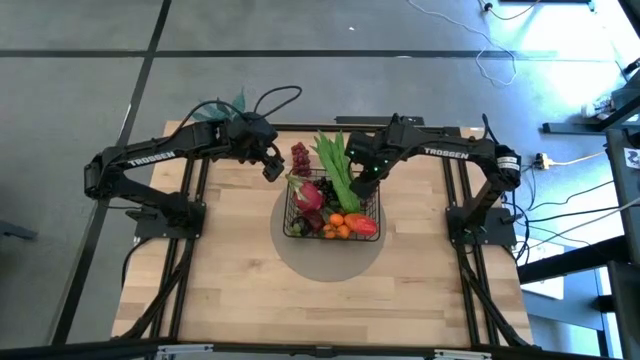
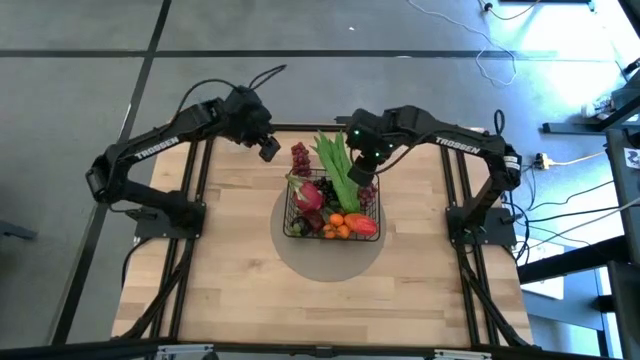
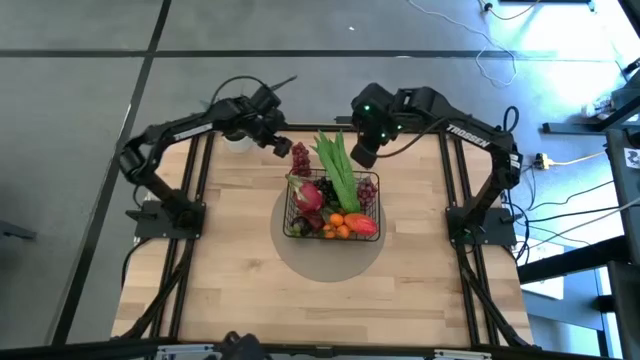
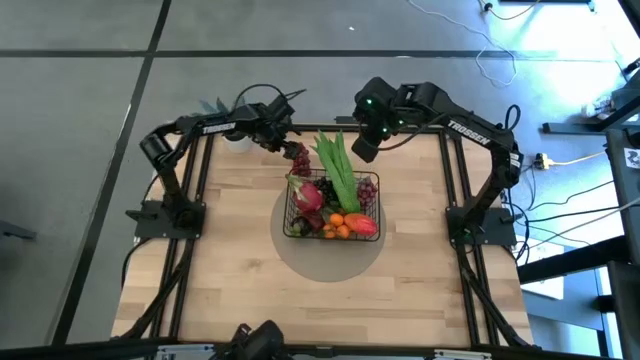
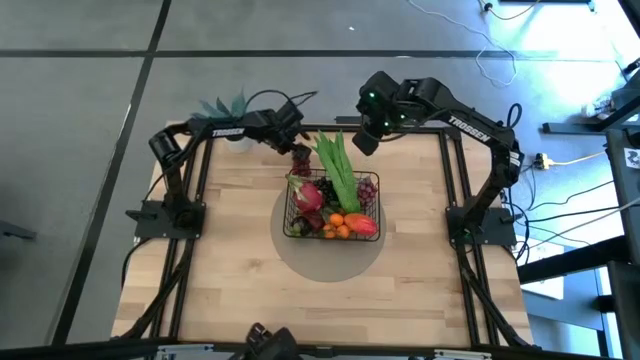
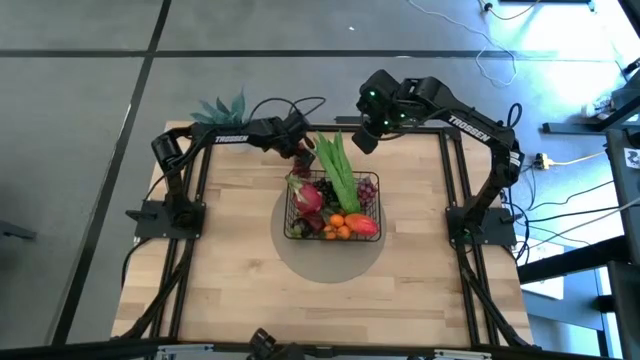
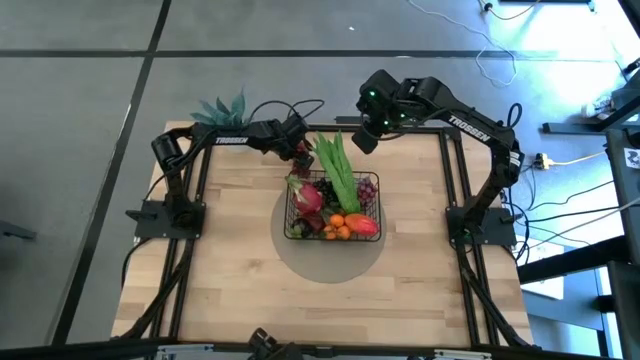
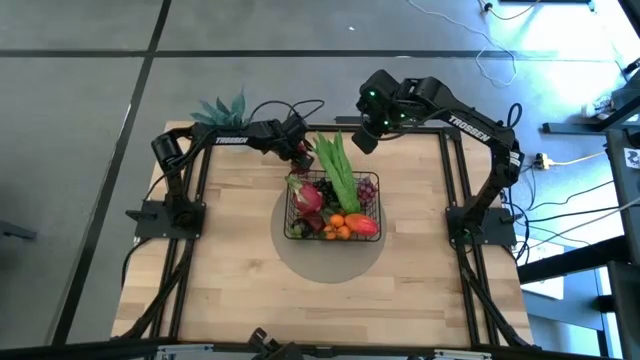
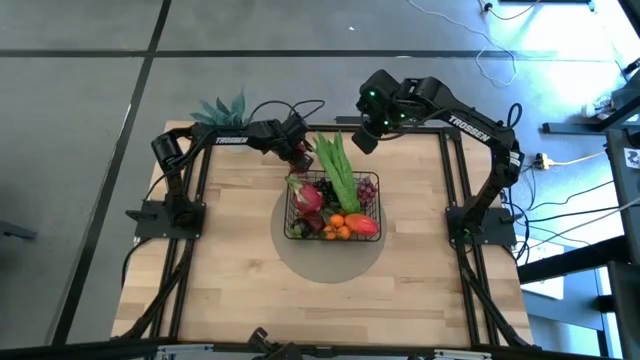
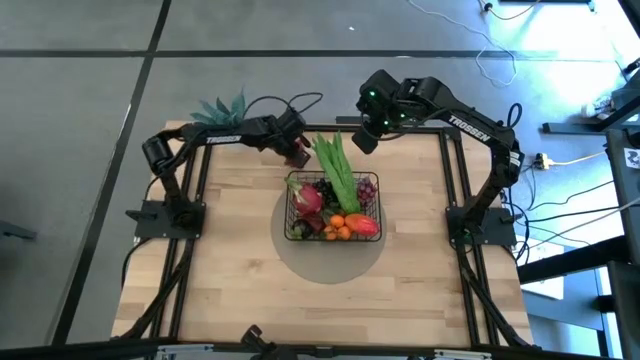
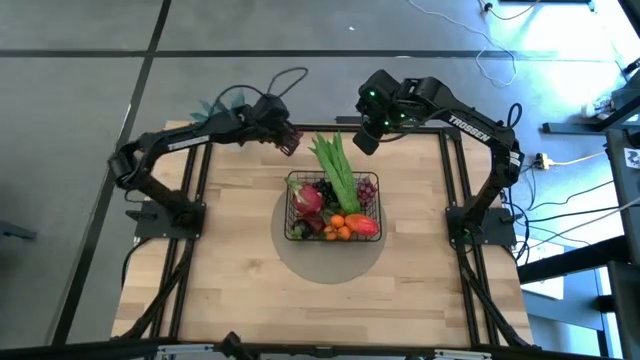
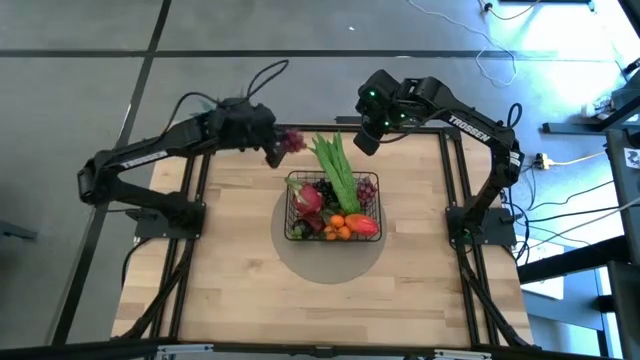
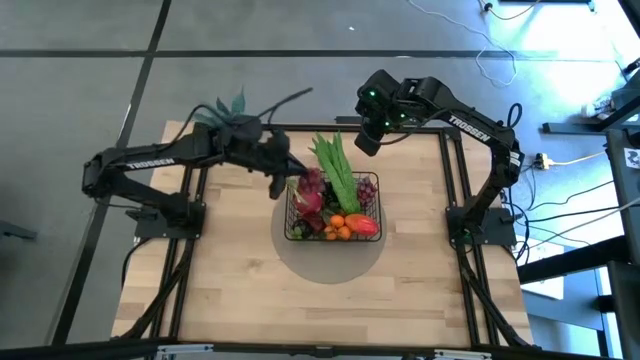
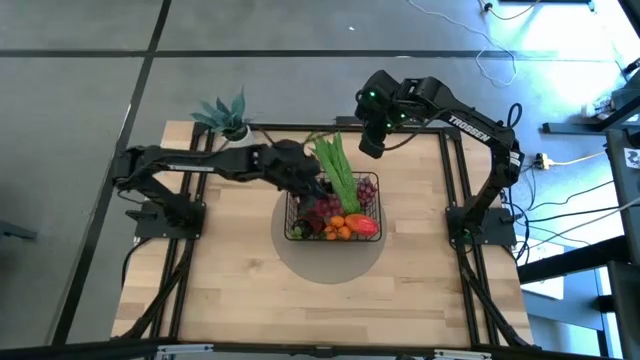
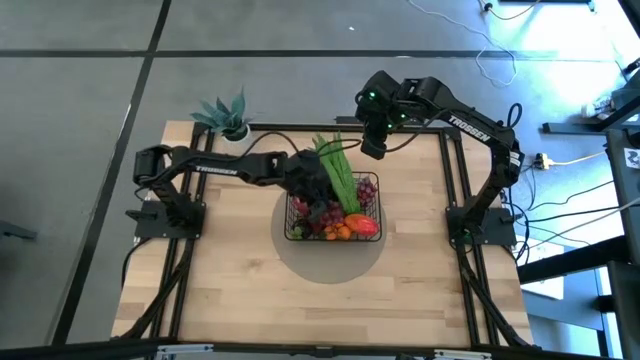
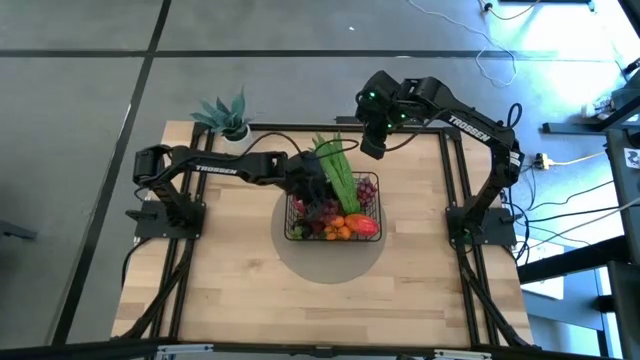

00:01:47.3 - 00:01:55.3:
Task: Build produce basket
Put the red grapes into the black wire basket

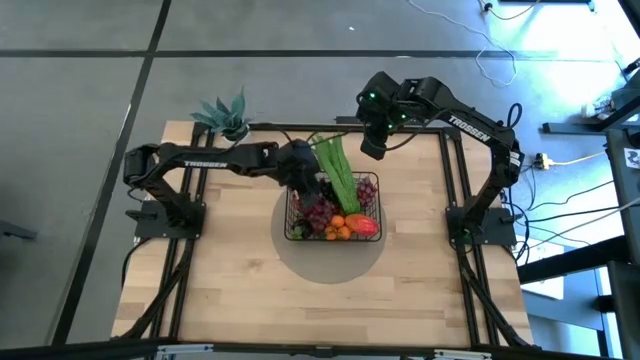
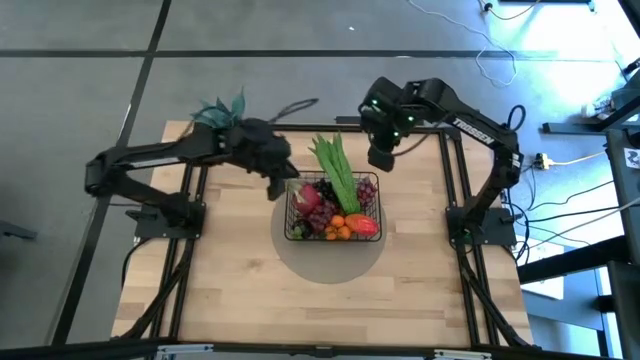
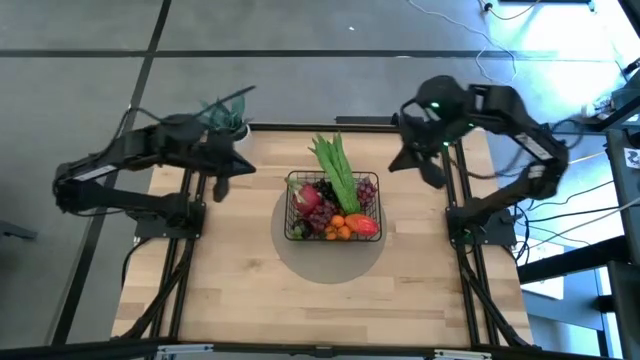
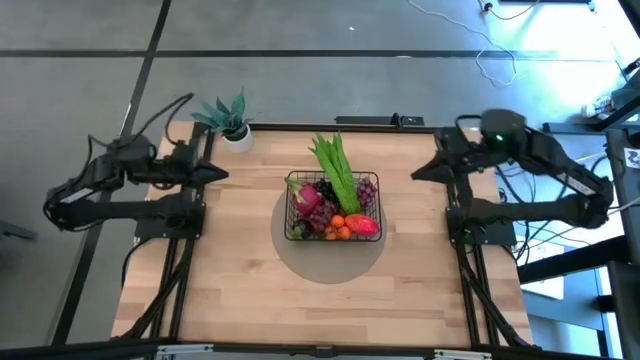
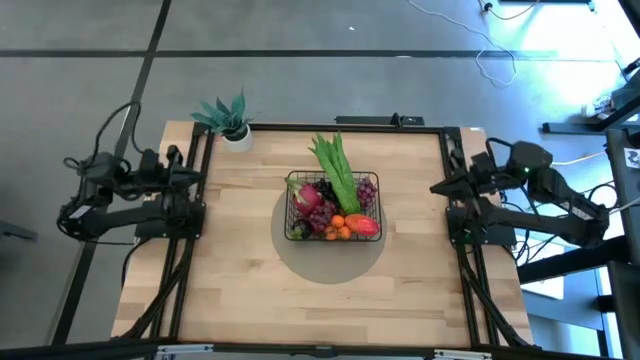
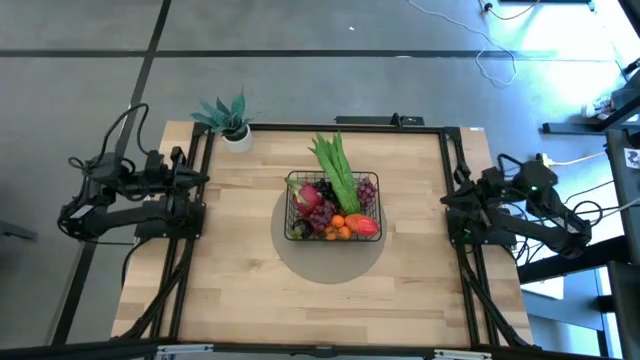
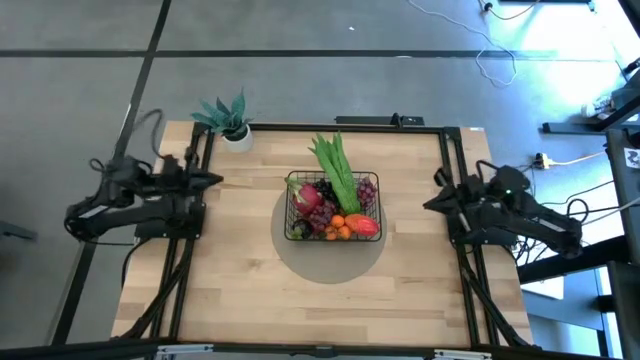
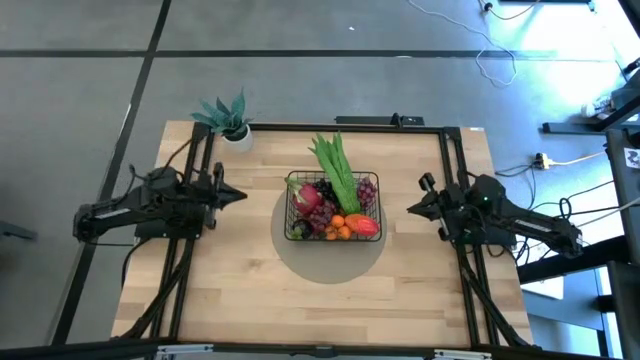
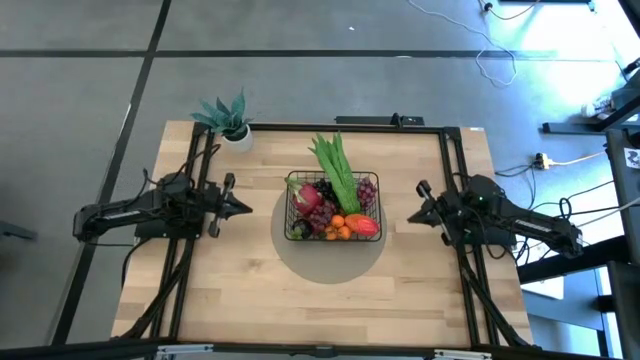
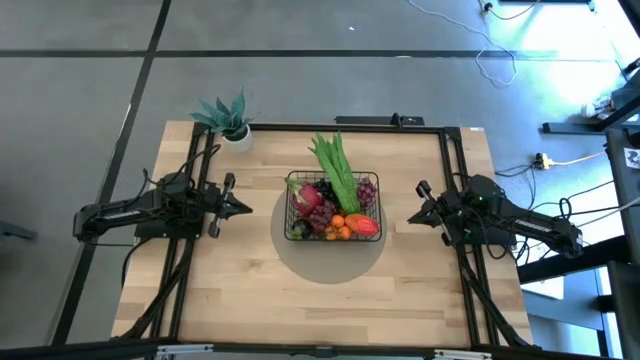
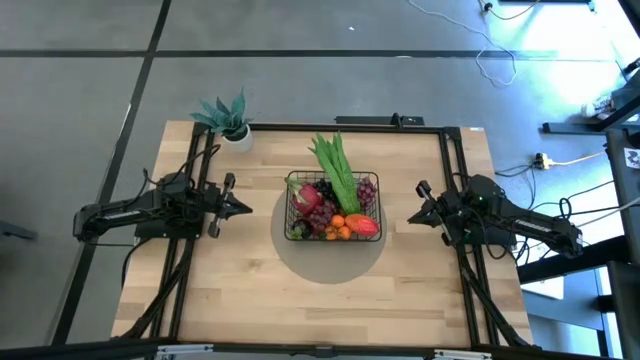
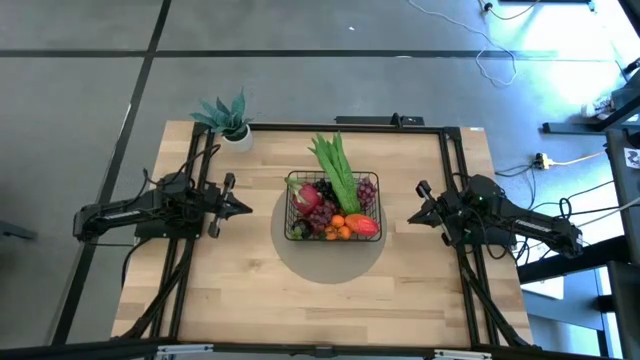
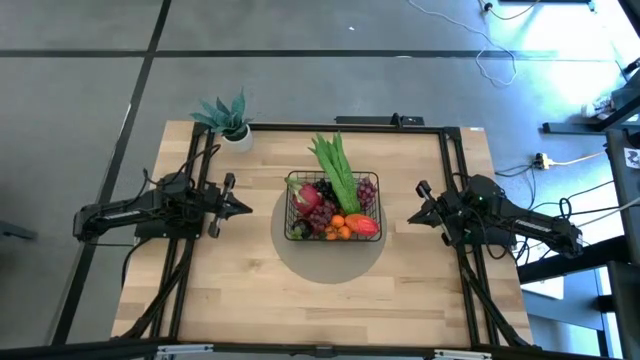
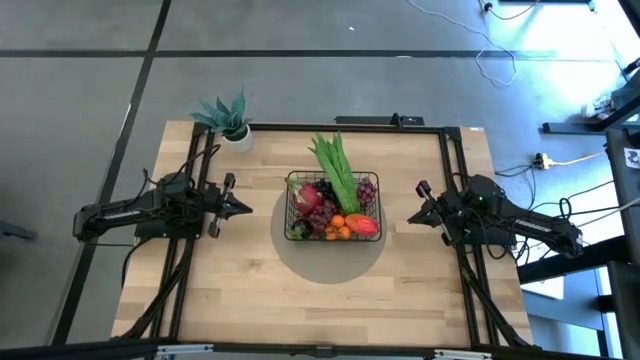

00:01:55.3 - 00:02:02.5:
Return to Home Position

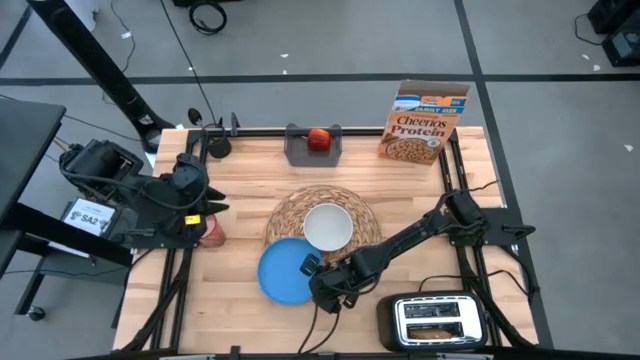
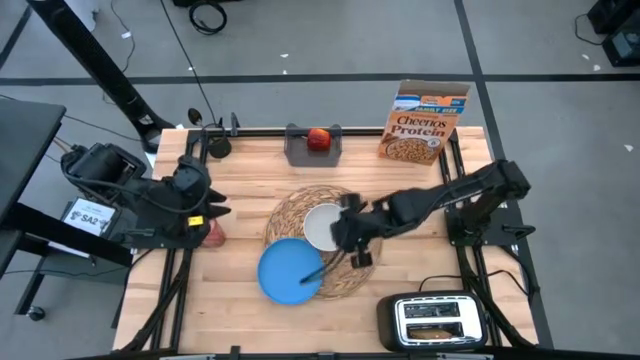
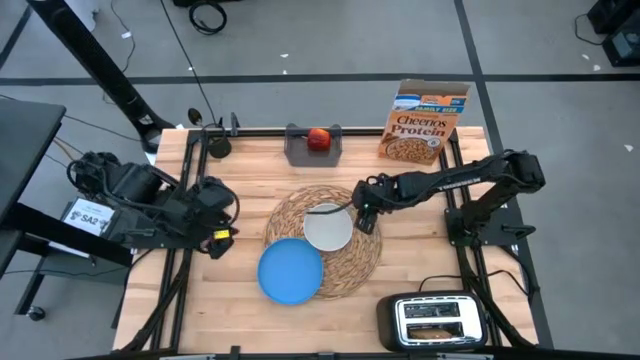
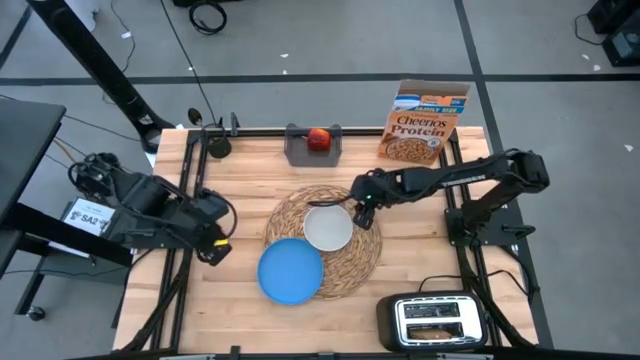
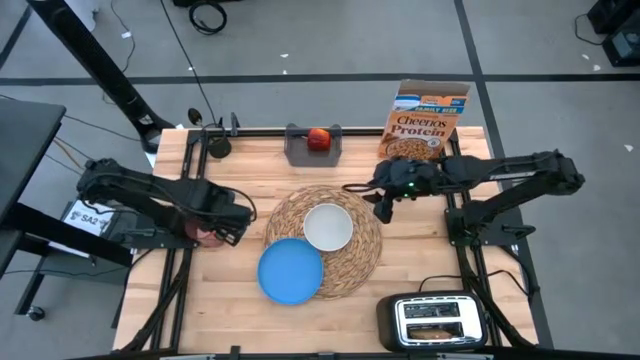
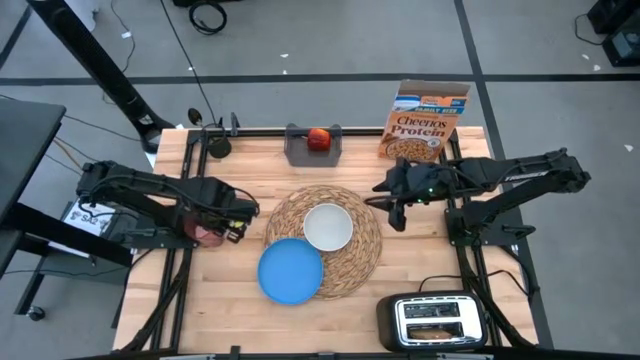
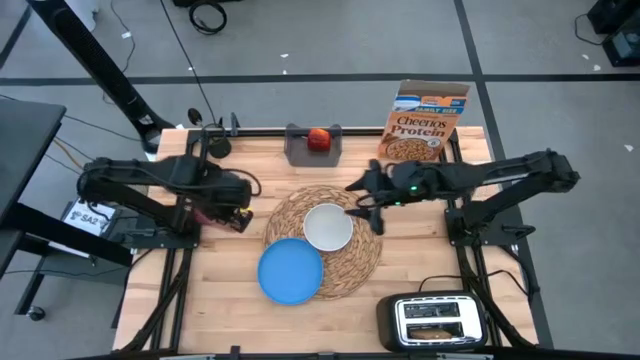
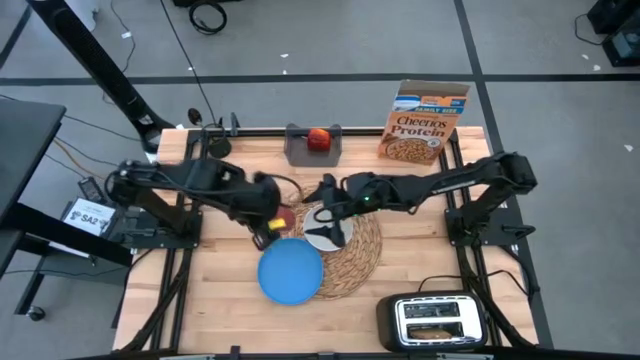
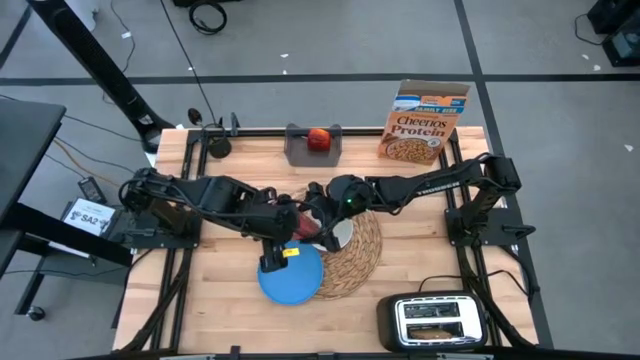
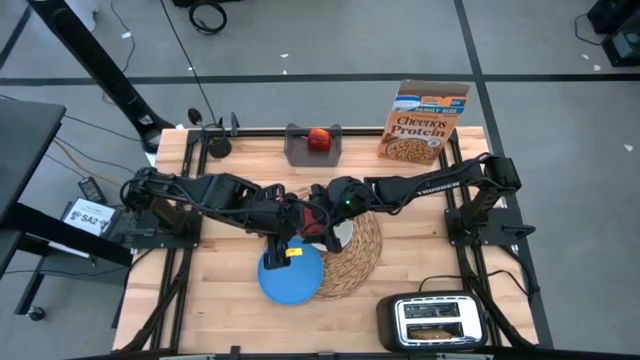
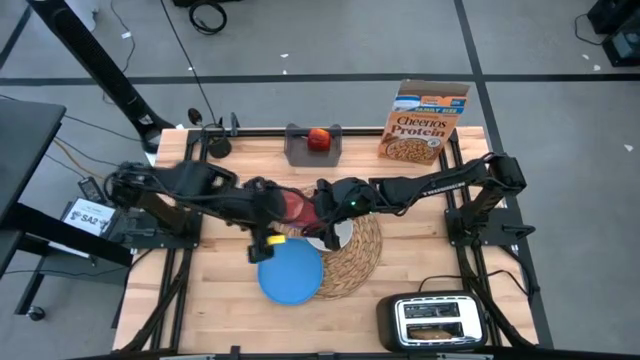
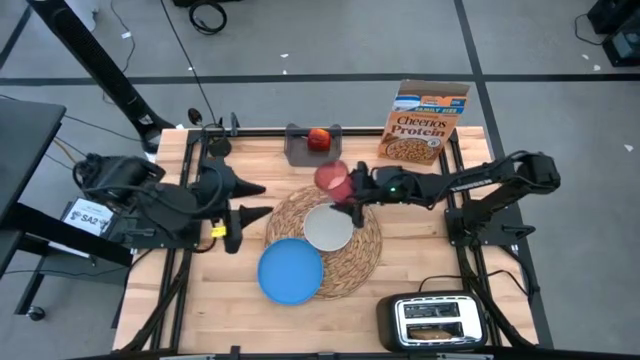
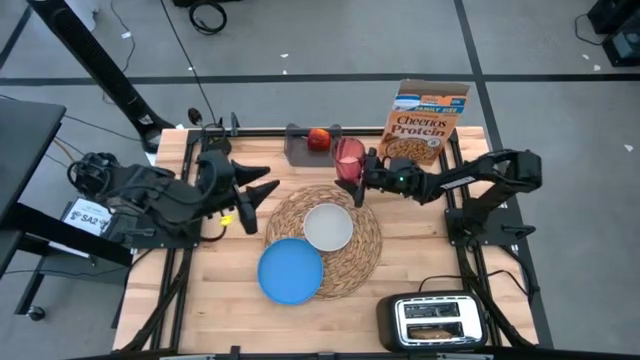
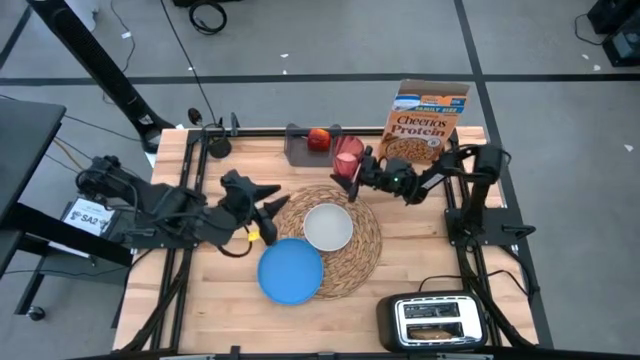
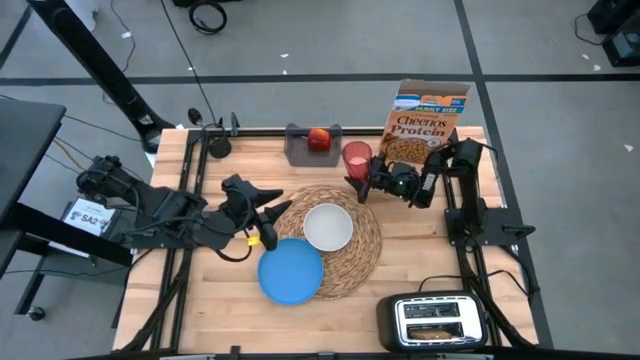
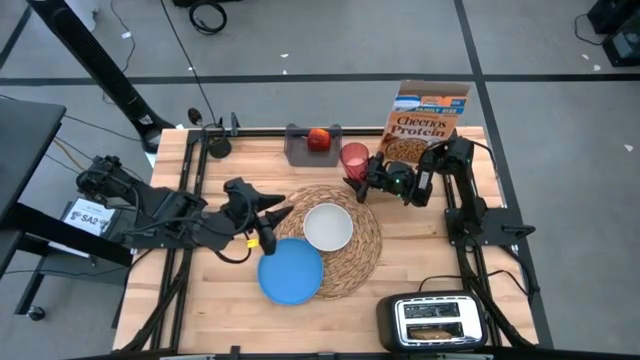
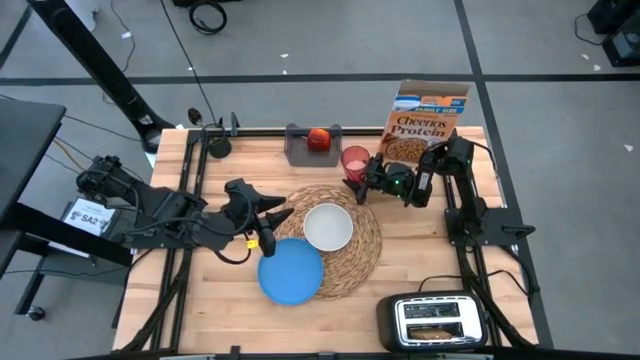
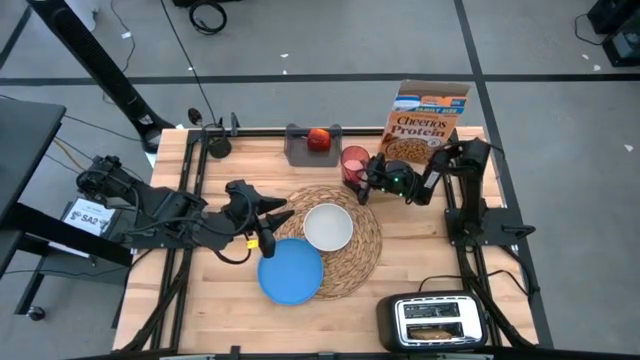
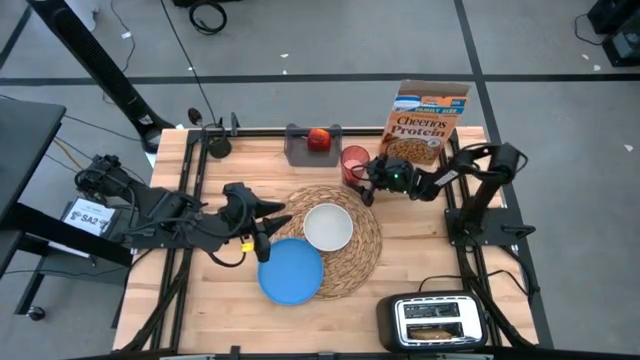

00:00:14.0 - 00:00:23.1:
Task: Arrange a breakfast setting
Move the red cup of milk to the top left of the brown tablemat
